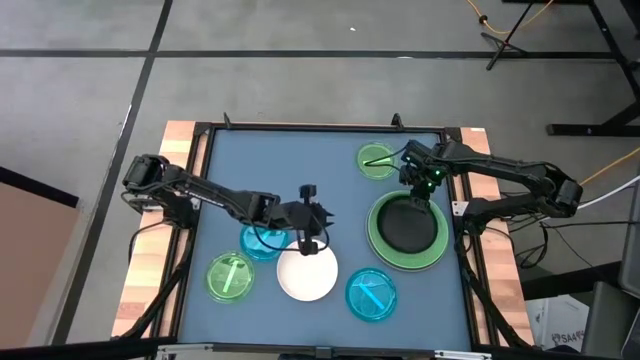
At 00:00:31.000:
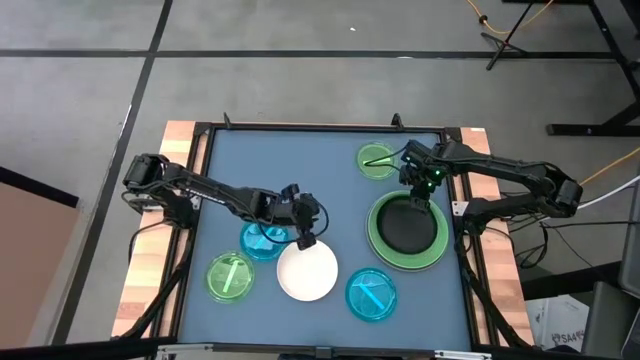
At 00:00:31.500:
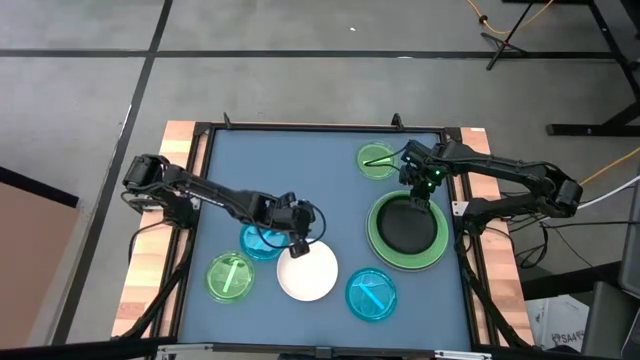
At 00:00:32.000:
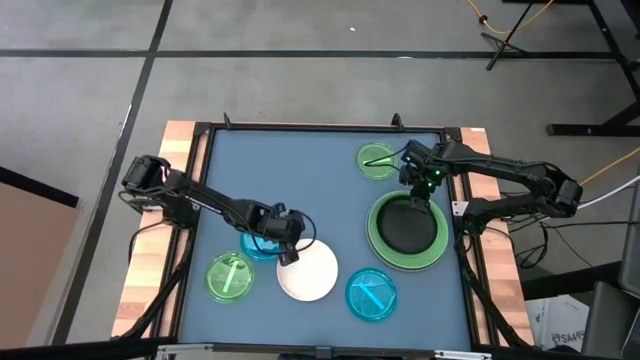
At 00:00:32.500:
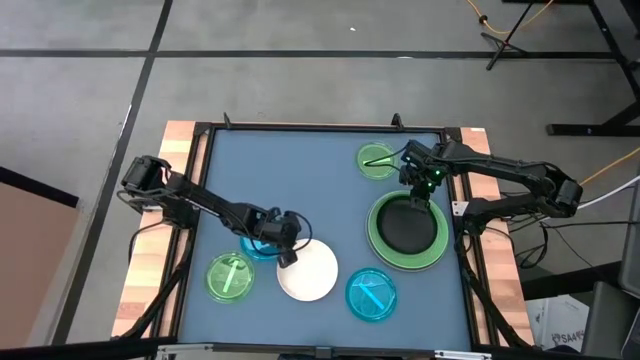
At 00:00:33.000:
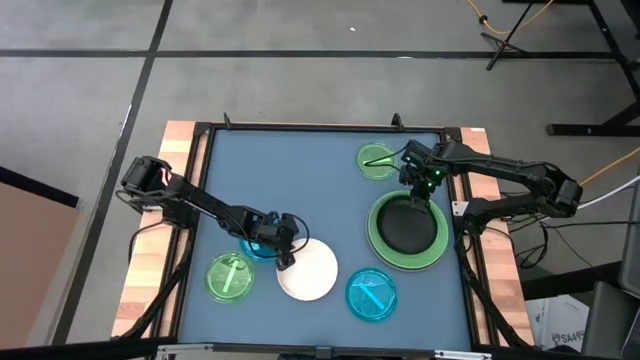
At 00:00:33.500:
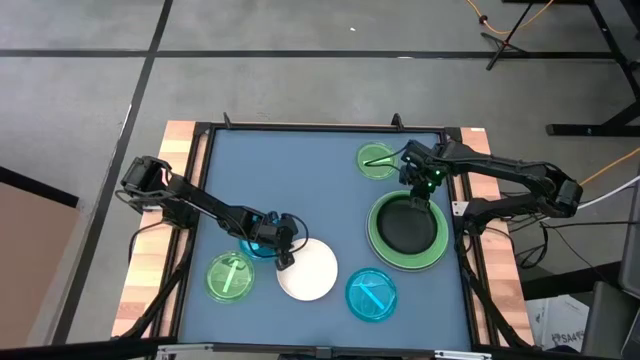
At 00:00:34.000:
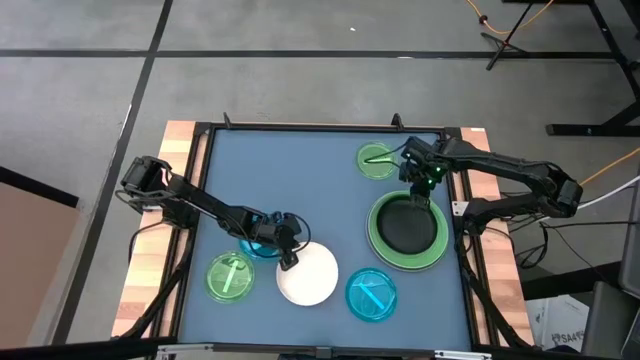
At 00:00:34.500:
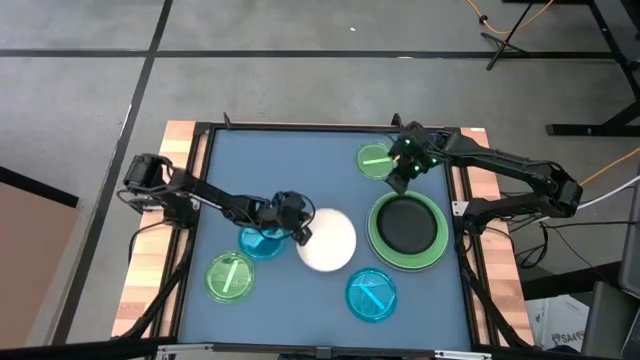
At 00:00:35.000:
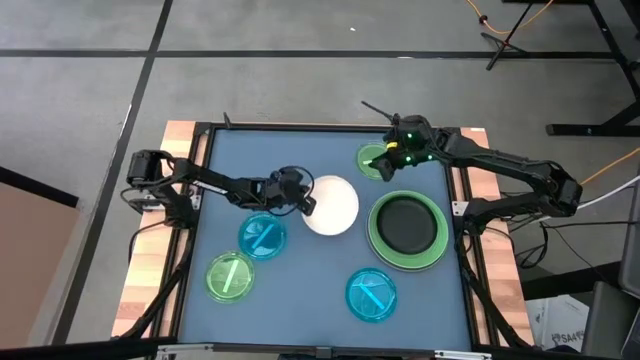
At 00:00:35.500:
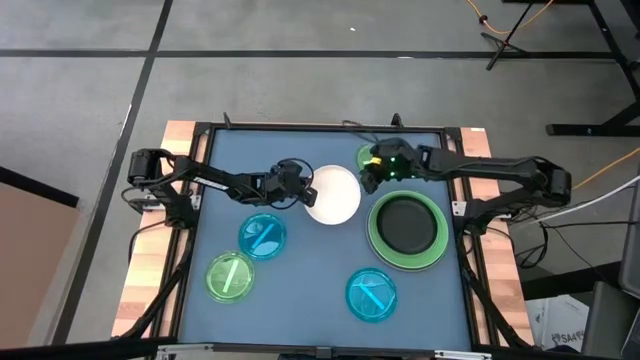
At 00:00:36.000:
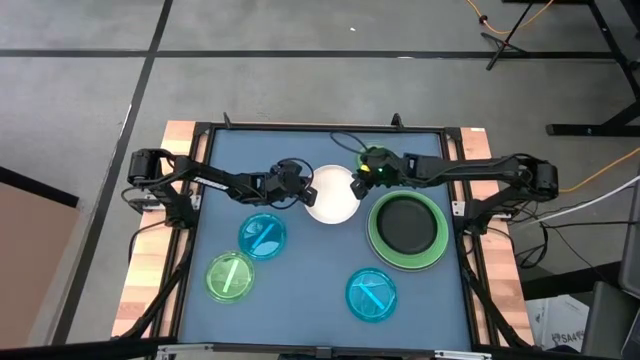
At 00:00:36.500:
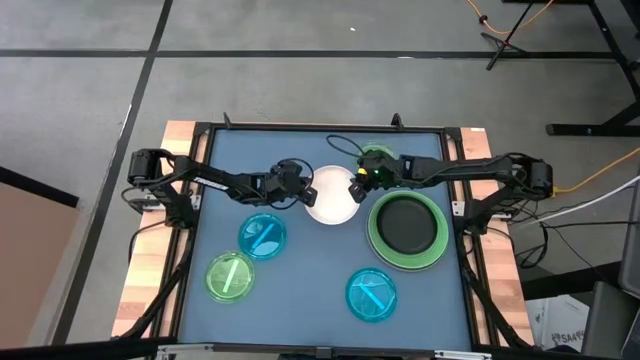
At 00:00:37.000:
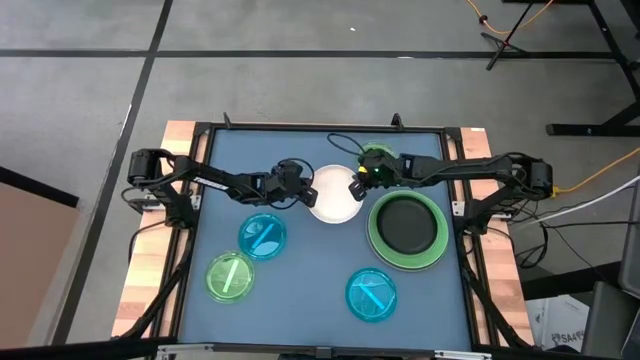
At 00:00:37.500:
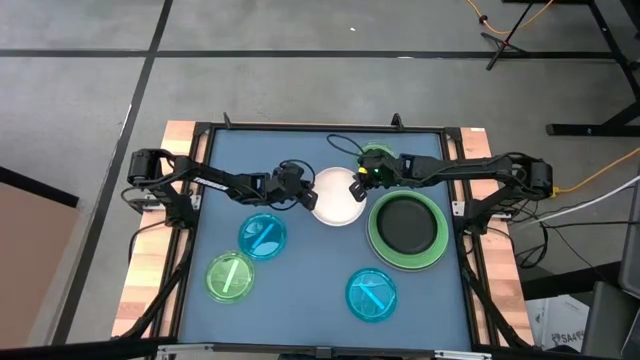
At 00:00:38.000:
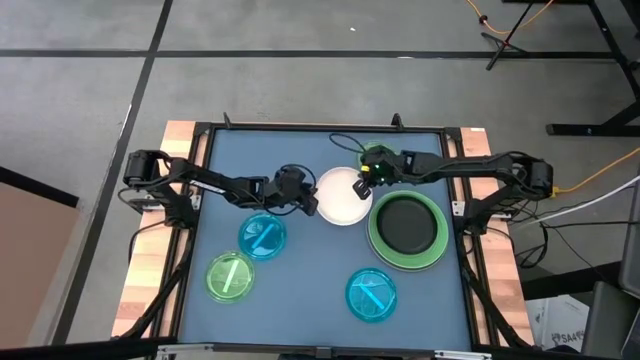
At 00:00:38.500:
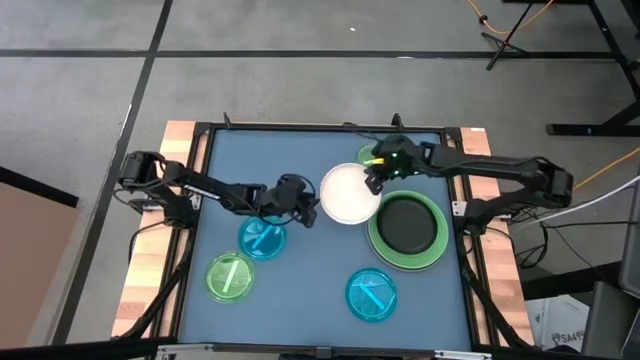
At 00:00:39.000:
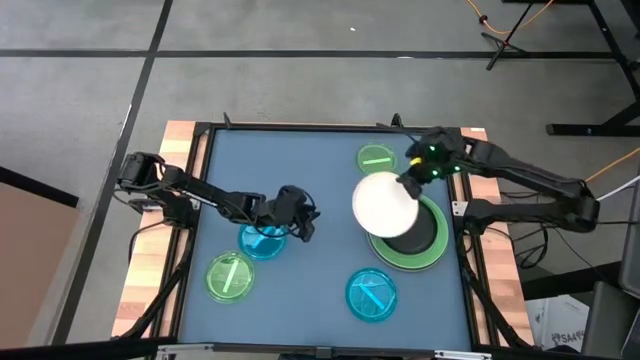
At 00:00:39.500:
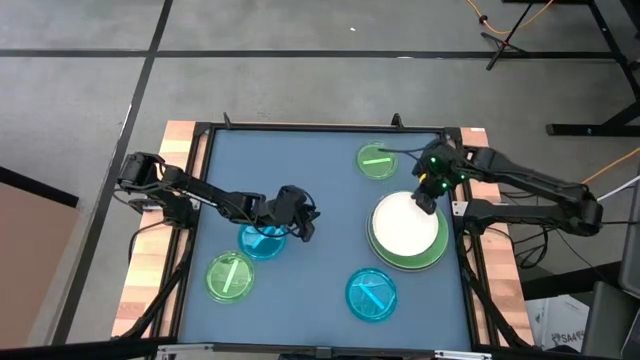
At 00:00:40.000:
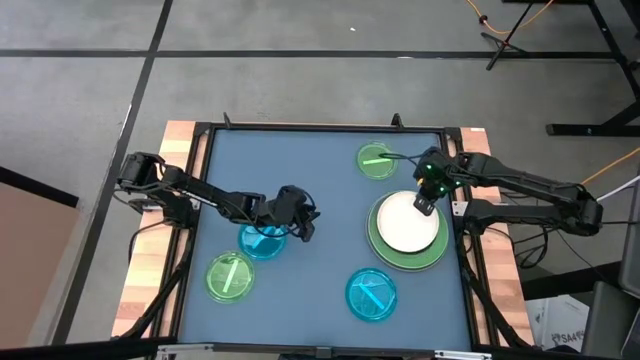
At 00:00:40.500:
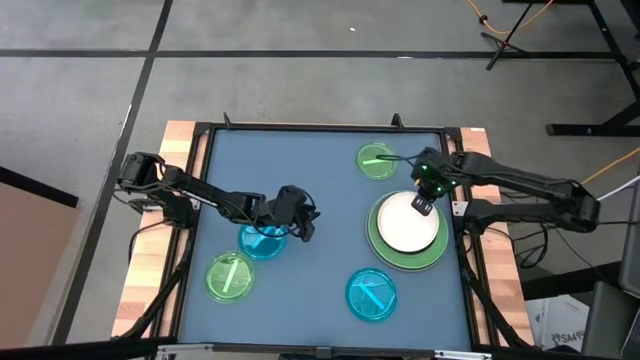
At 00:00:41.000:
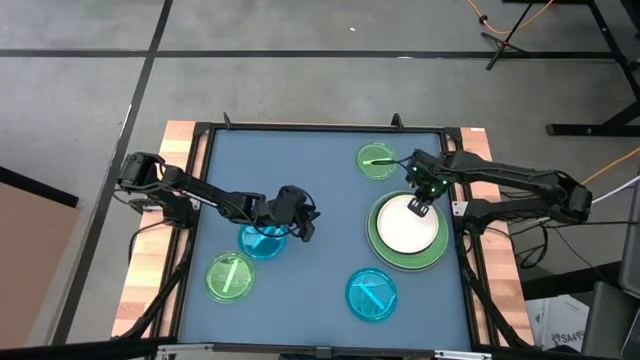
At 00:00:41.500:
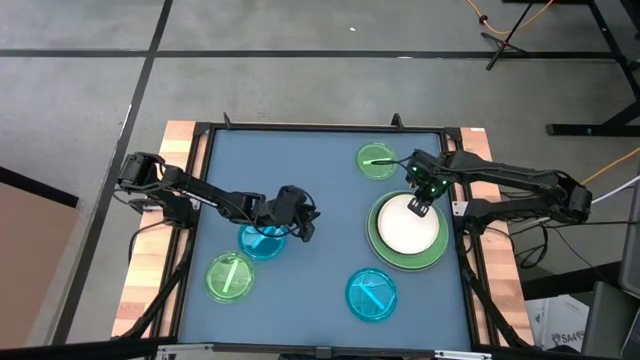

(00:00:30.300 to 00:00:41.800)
Task: Stack plastic plates
Stack the white plate on top of the black plate

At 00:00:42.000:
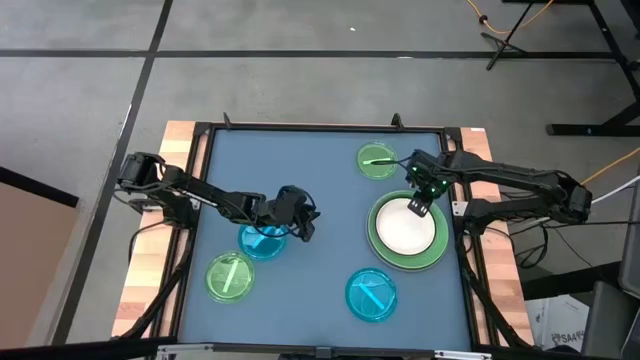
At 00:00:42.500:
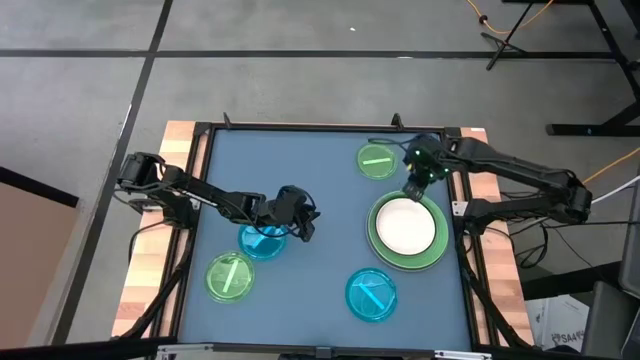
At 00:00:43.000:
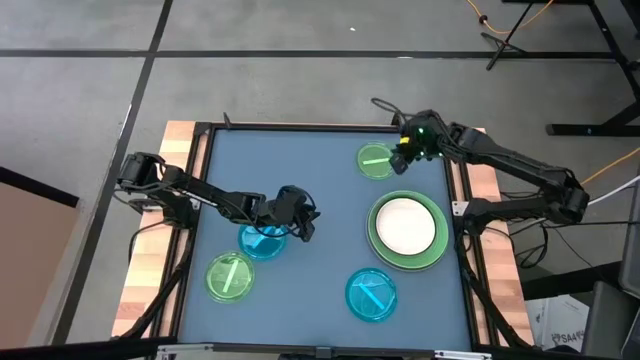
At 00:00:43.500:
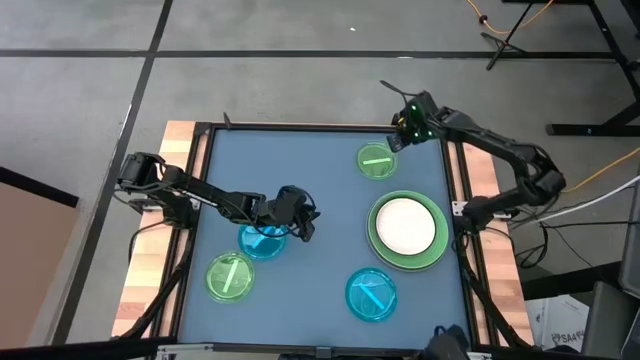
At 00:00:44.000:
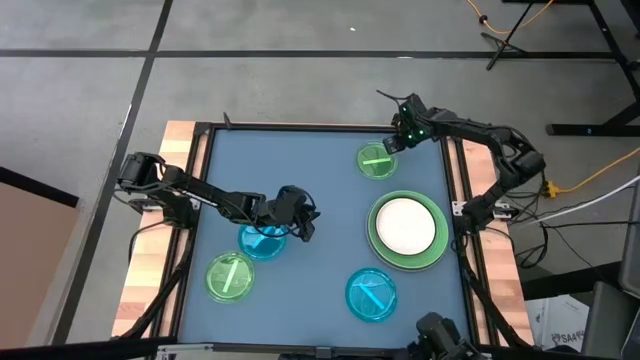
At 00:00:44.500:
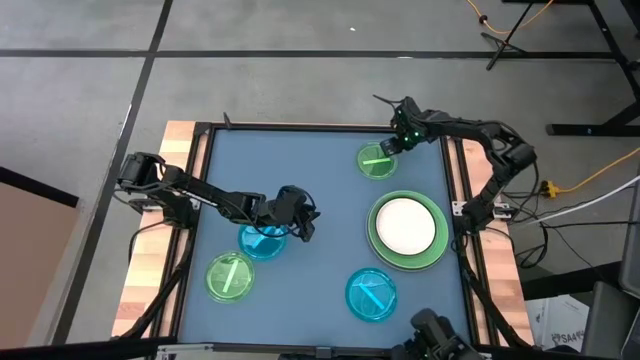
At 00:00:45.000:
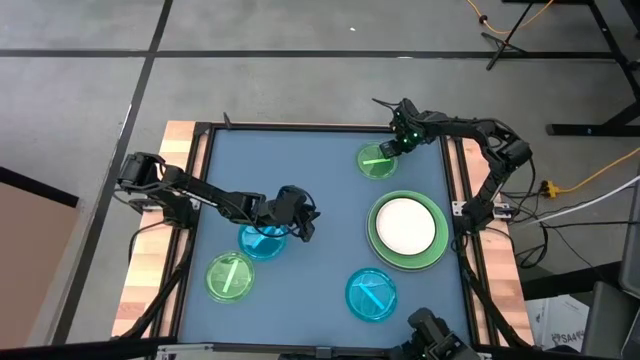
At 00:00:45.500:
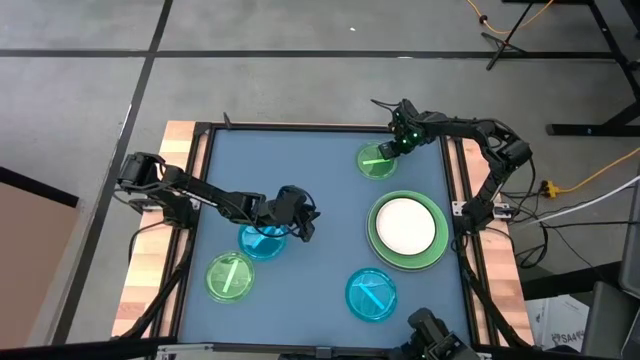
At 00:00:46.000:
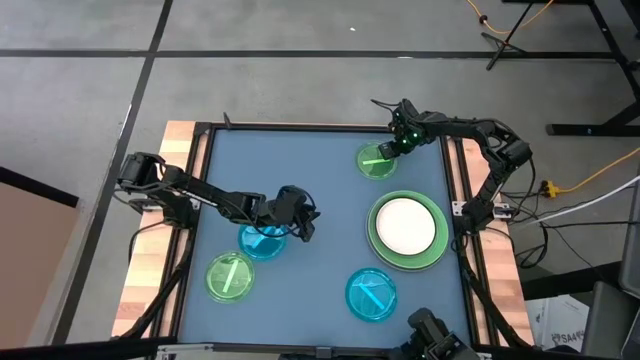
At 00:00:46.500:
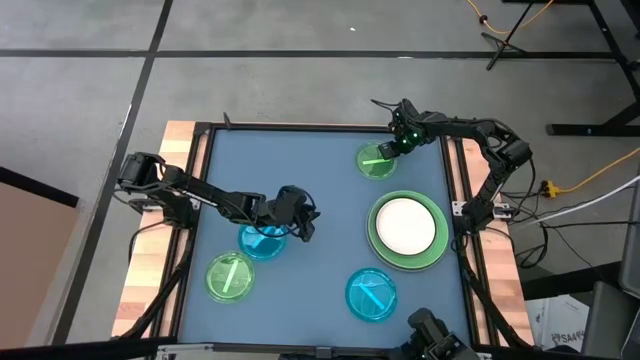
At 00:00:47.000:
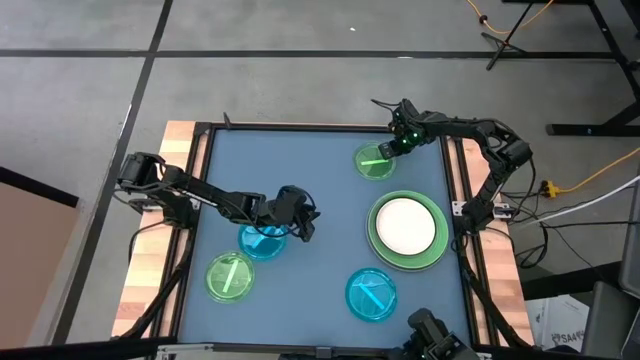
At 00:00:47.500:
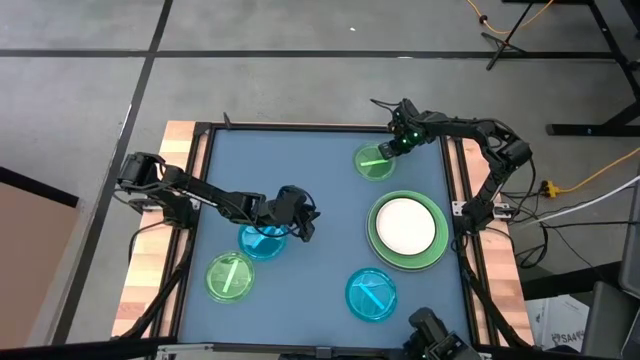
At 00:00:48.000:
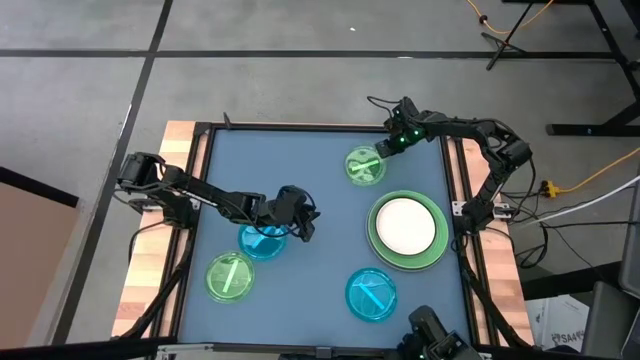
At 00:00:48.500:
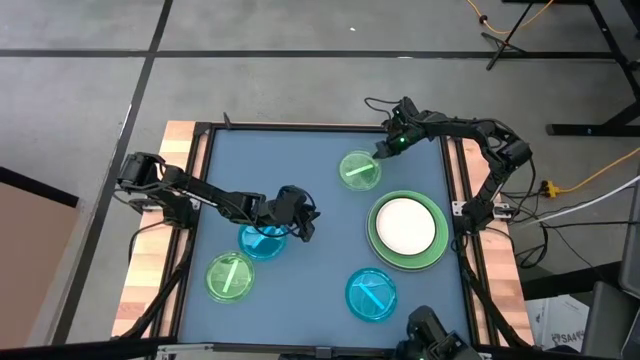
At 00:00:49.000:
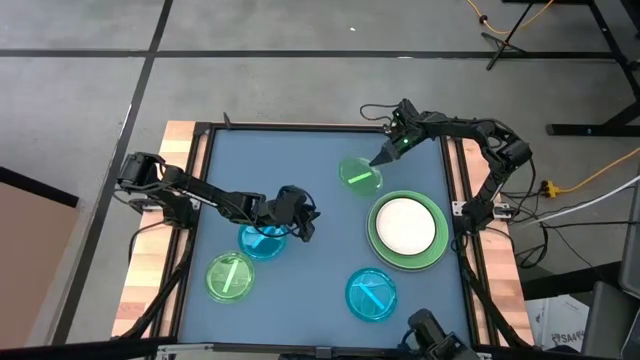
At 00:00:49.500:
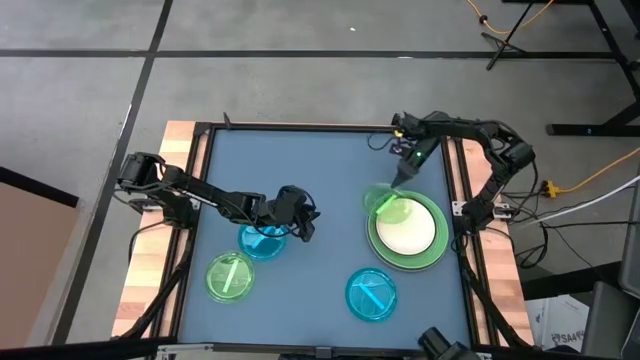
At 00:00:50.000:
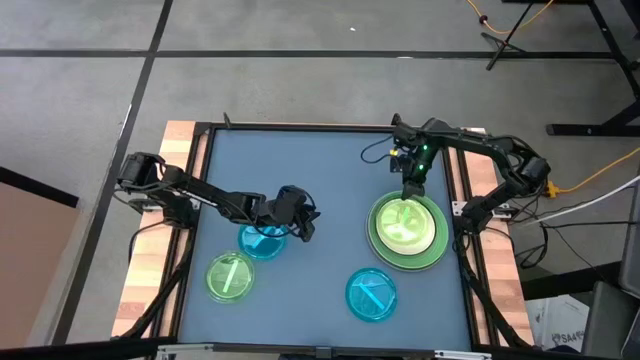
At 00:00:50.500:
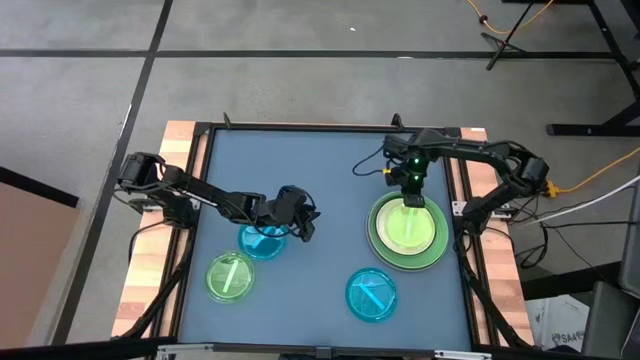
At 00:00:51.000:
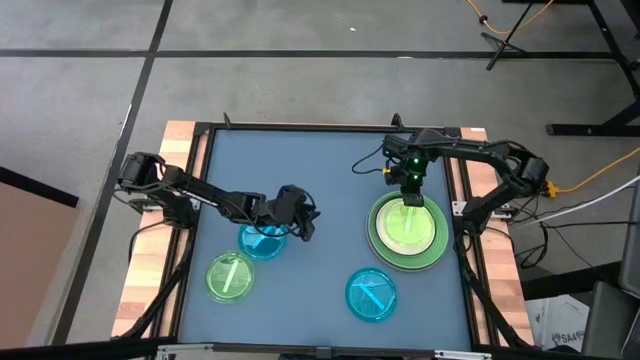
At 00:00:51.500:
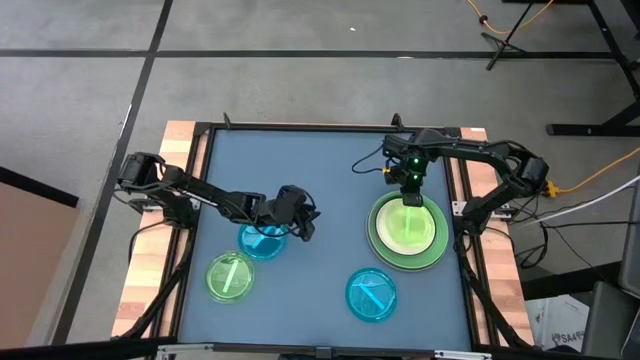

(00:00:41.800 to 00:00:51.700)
Stack the top green plate on top of the white plate
